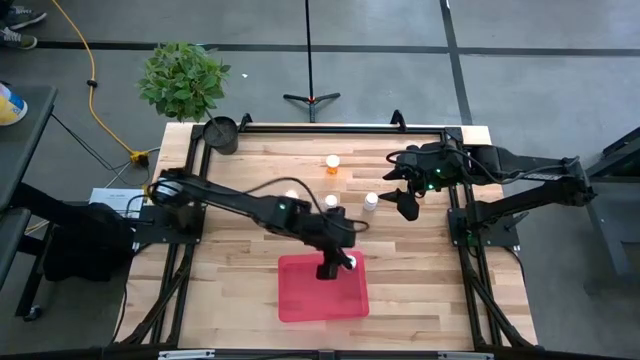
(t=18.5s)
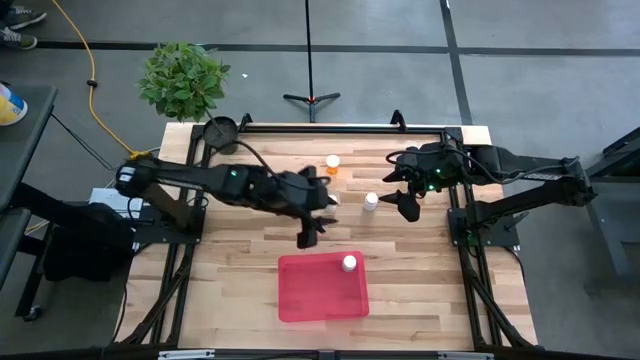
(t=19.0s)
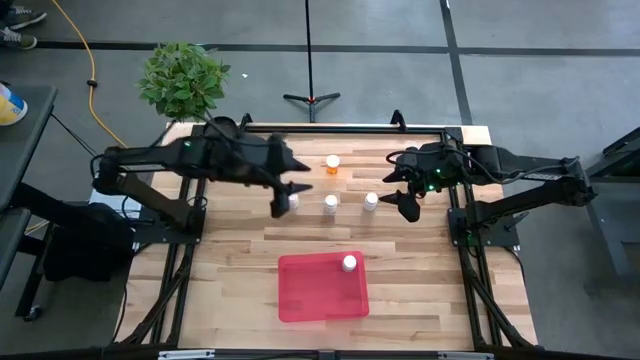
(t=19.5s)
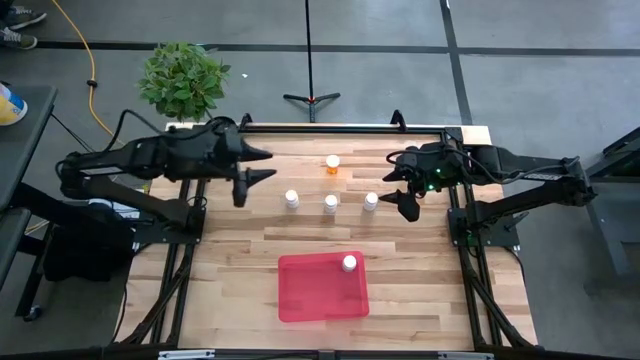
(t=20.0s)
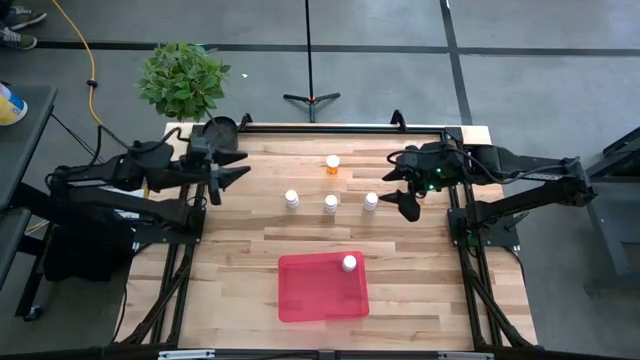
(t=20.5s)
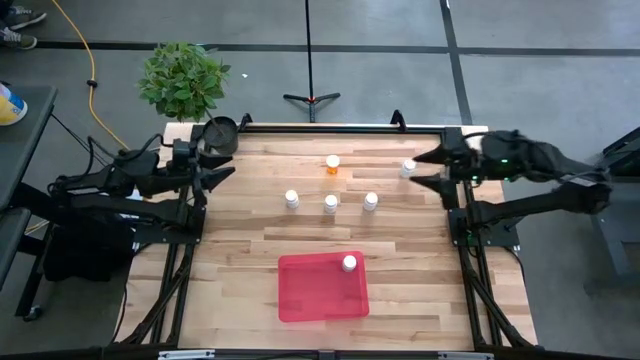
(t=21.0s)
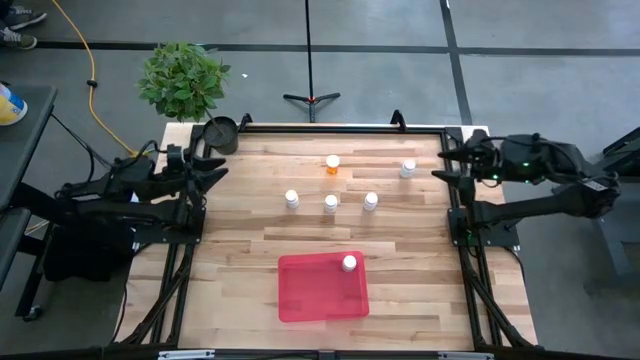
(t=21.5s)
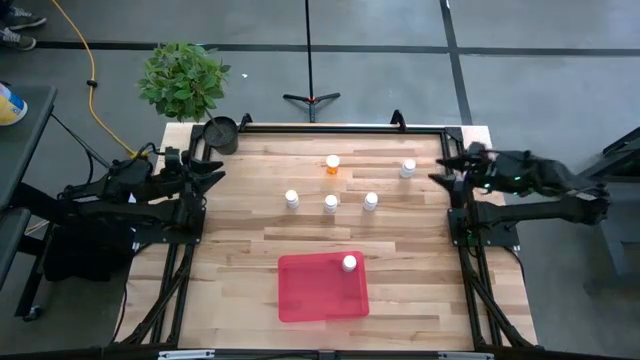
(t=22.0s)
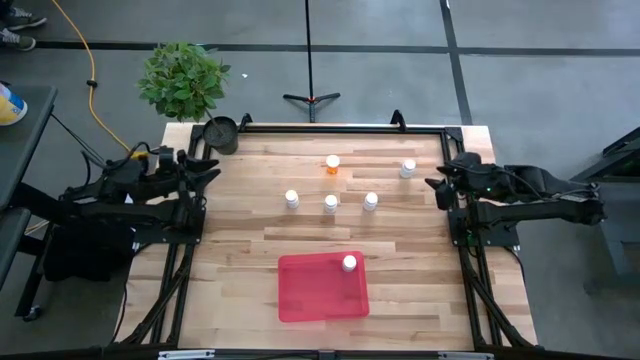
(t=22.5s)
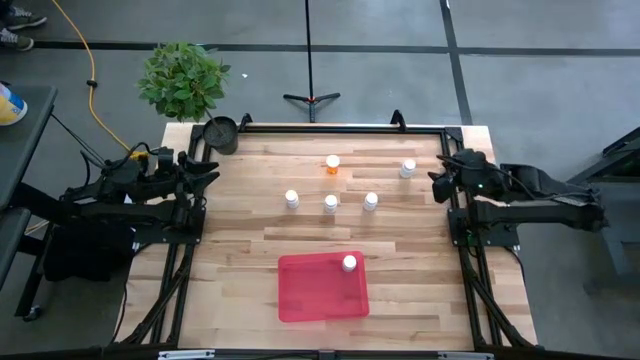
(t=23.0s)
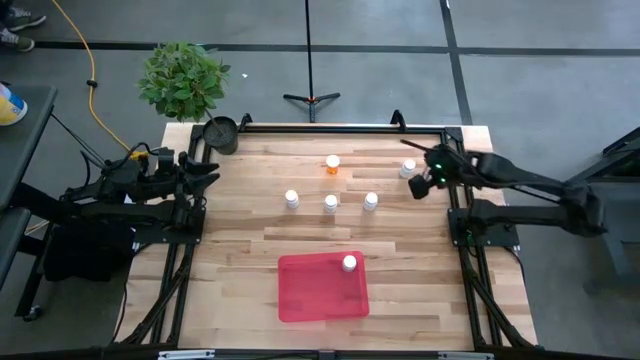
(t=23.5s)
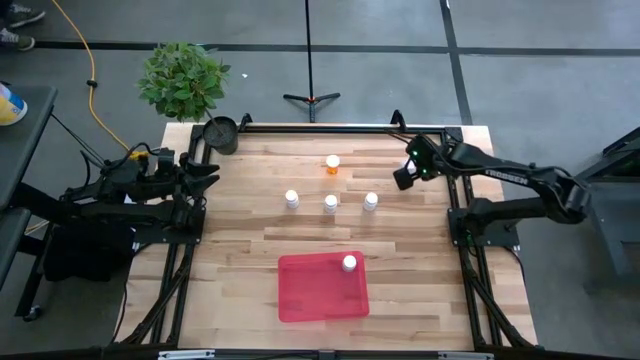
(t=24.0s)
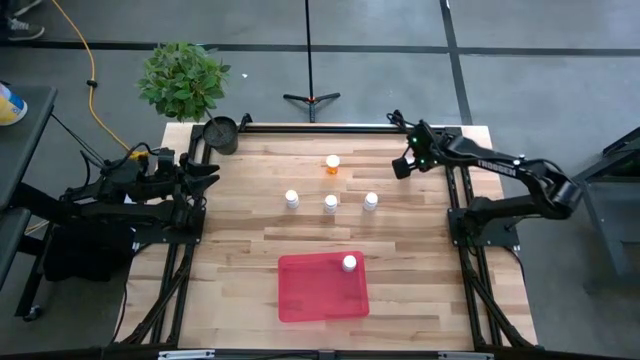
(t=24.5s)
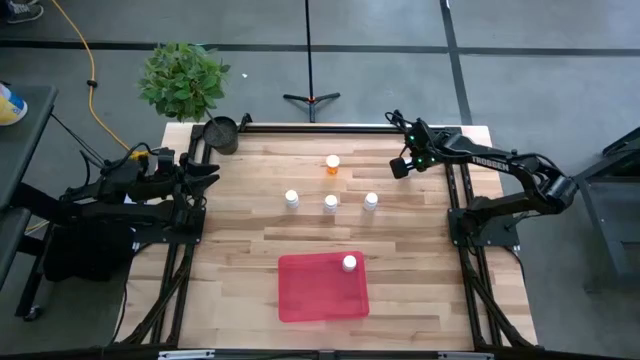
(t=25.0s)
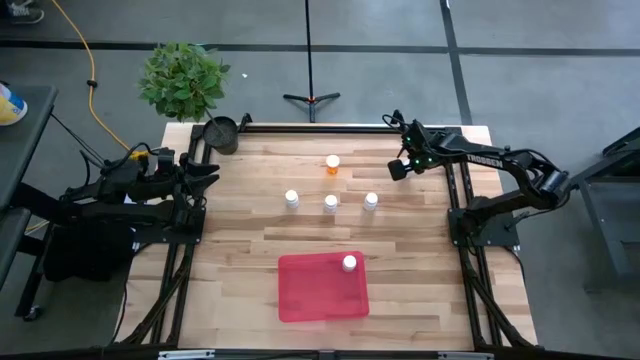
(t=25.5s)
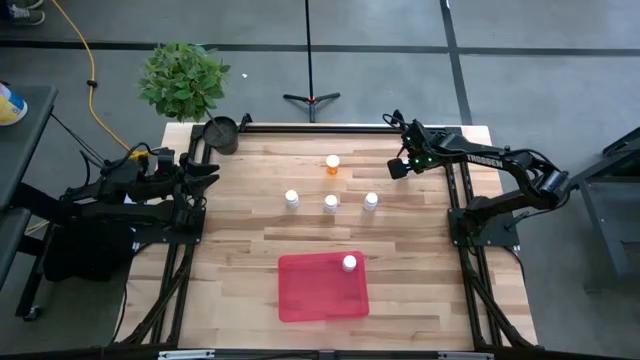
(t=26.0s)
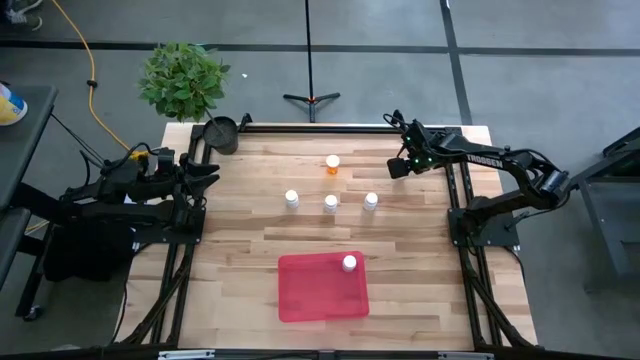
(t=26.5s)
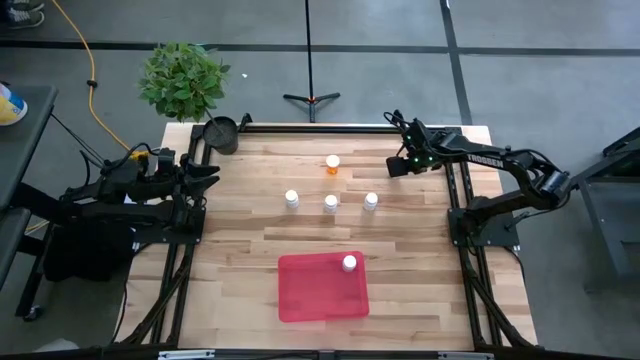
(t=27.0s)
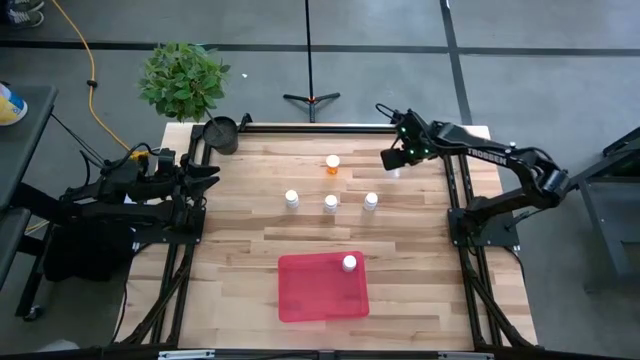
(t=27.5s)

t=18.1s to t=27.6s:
Task: Pick and place pill bottles into a basket
Put the white medicine bottle into the red container

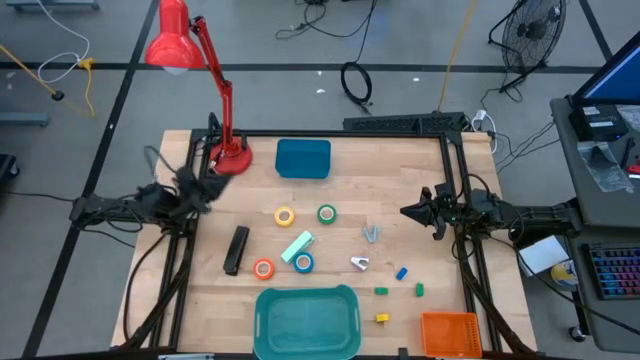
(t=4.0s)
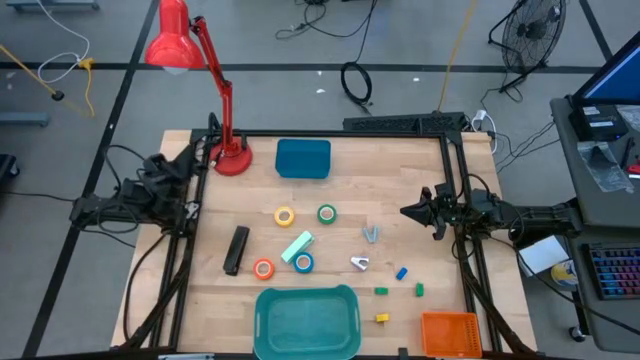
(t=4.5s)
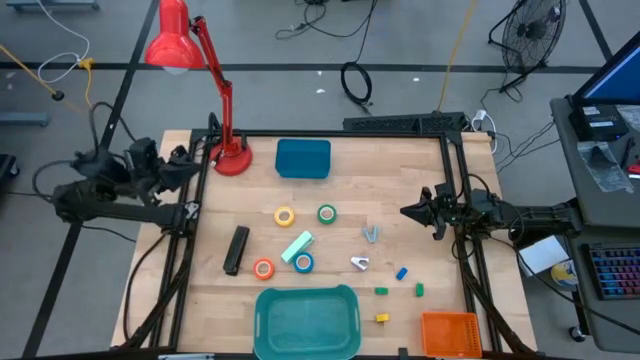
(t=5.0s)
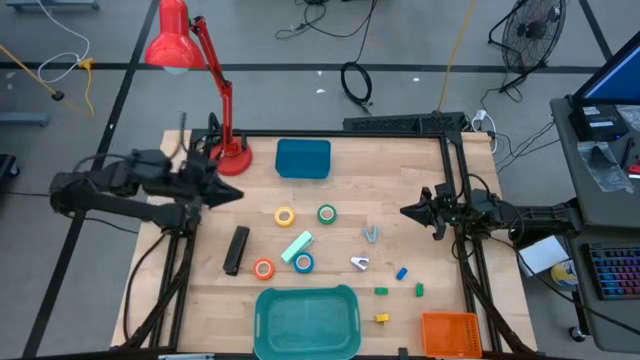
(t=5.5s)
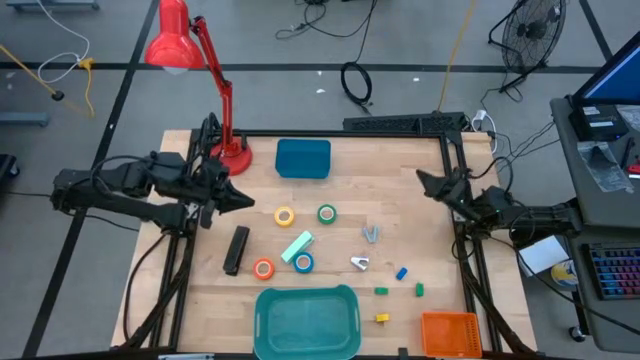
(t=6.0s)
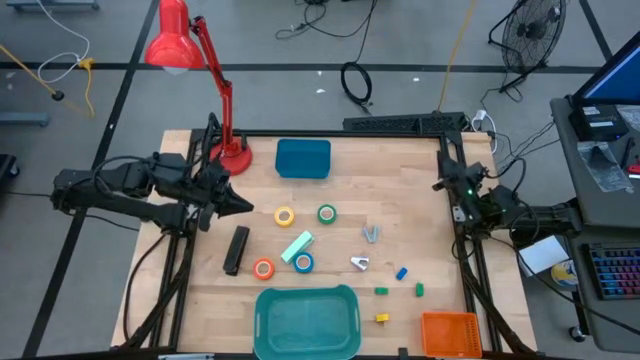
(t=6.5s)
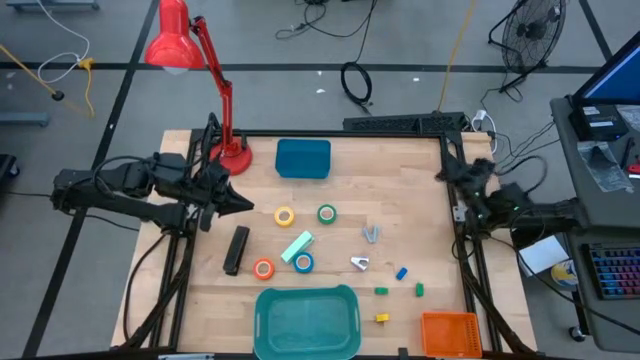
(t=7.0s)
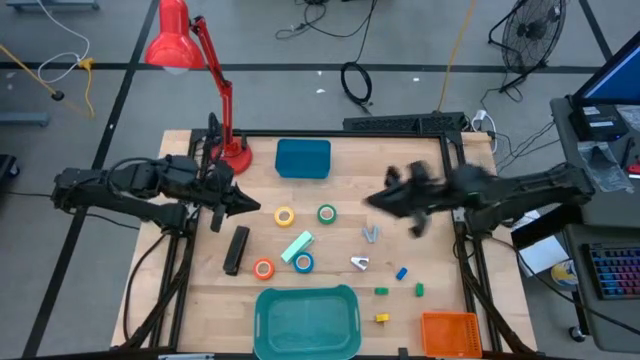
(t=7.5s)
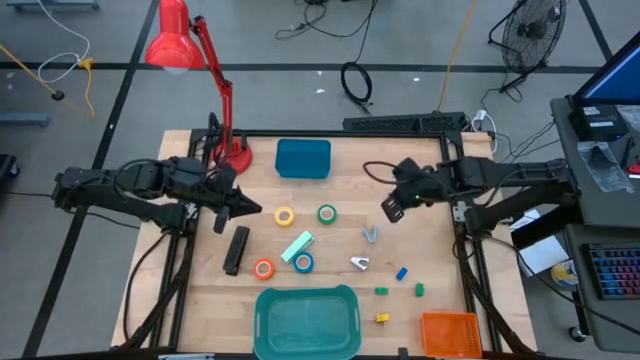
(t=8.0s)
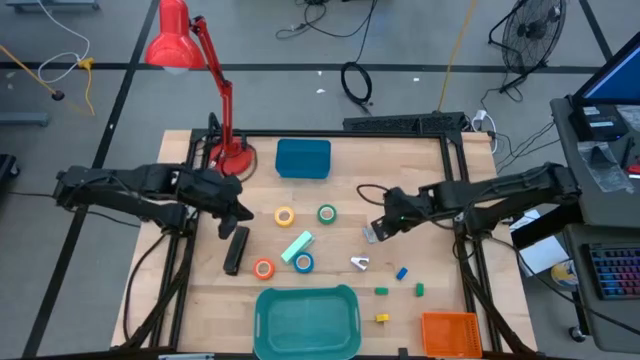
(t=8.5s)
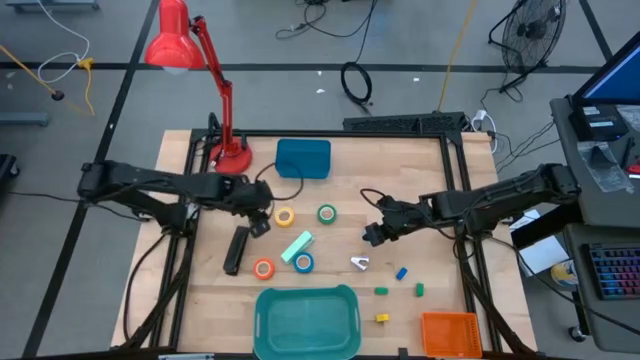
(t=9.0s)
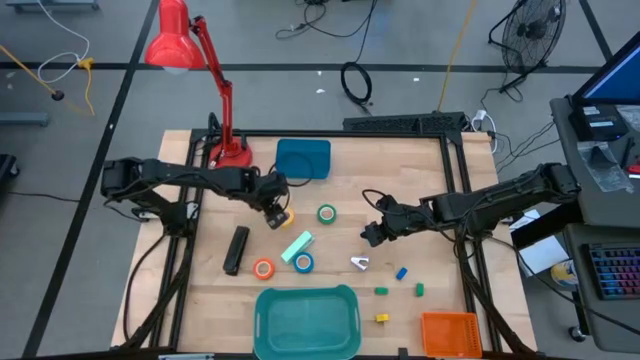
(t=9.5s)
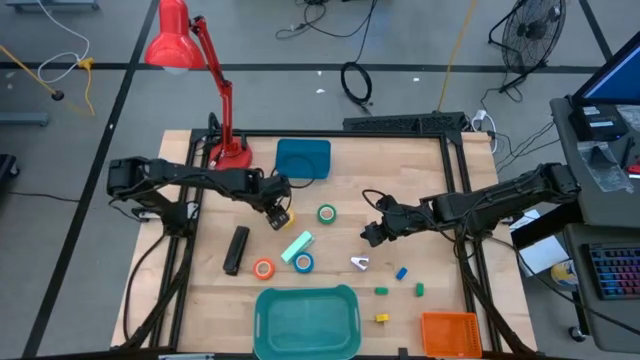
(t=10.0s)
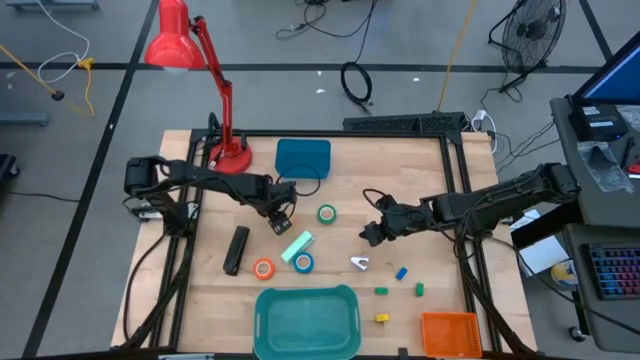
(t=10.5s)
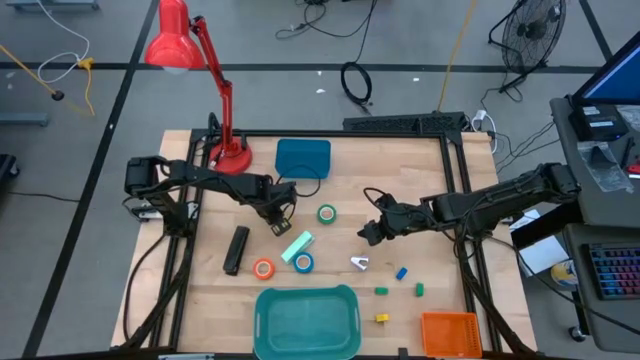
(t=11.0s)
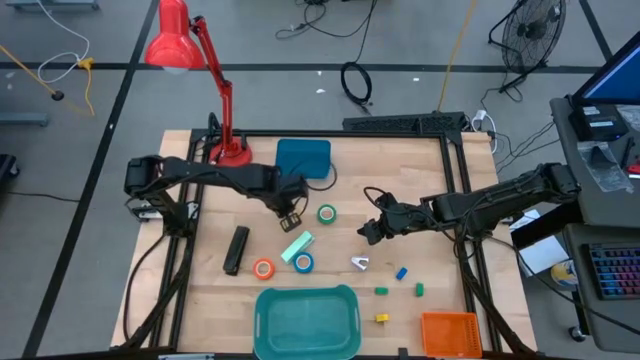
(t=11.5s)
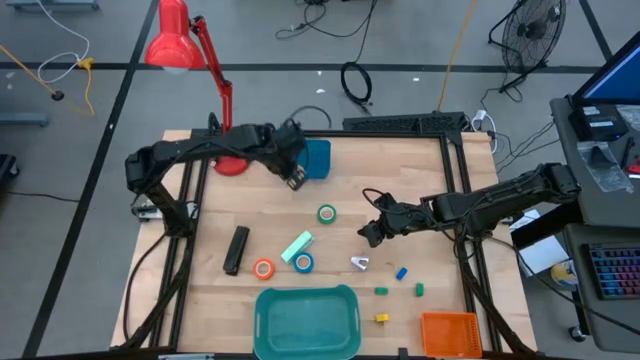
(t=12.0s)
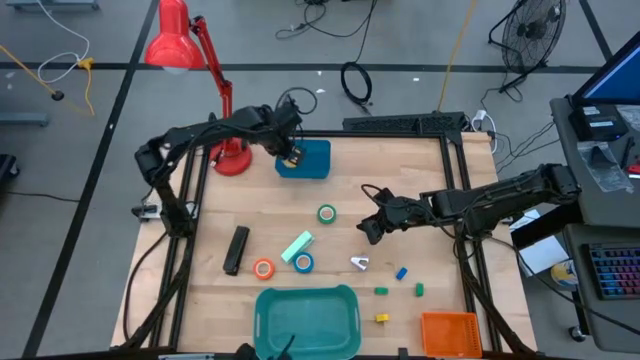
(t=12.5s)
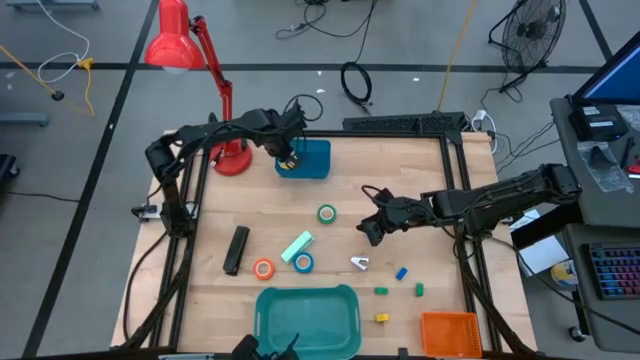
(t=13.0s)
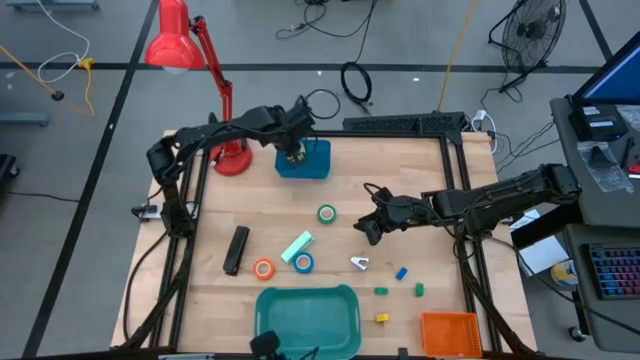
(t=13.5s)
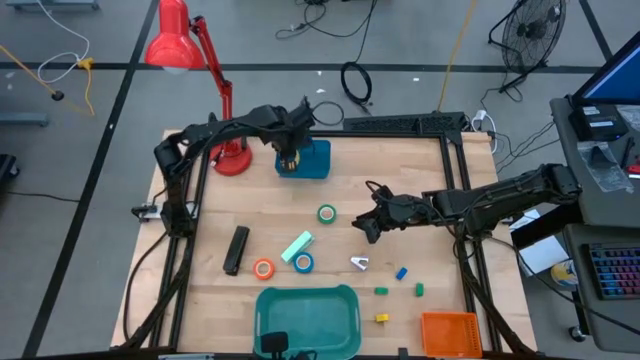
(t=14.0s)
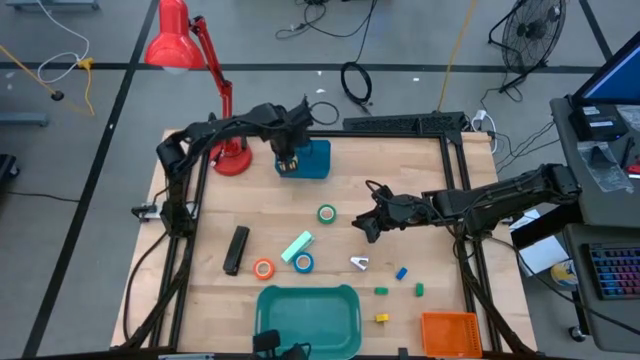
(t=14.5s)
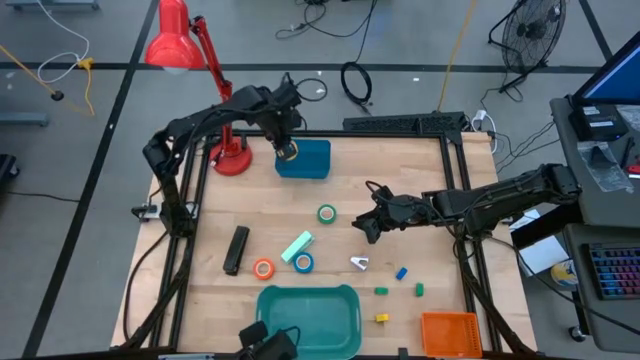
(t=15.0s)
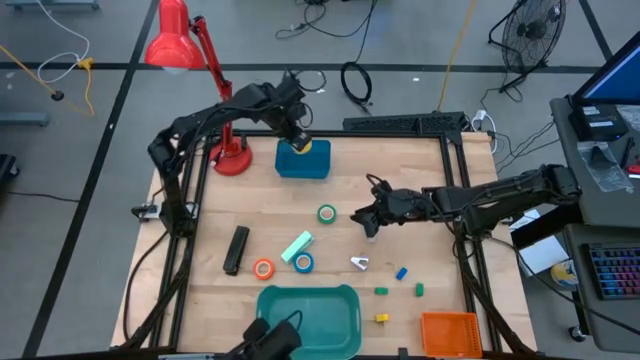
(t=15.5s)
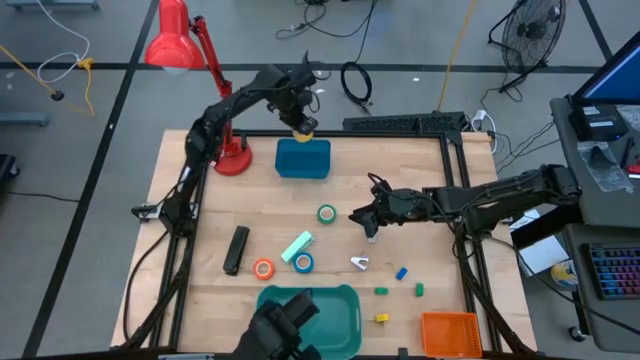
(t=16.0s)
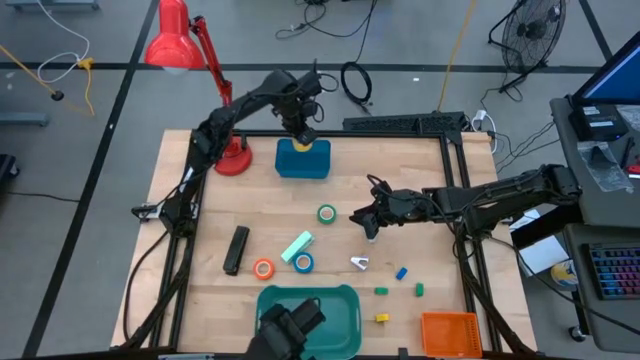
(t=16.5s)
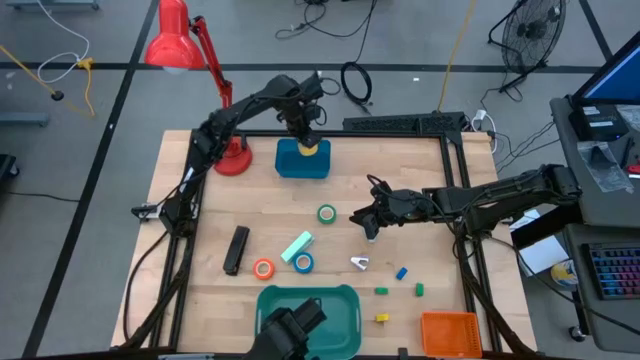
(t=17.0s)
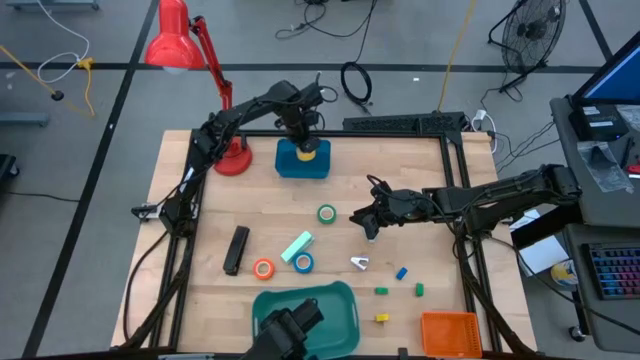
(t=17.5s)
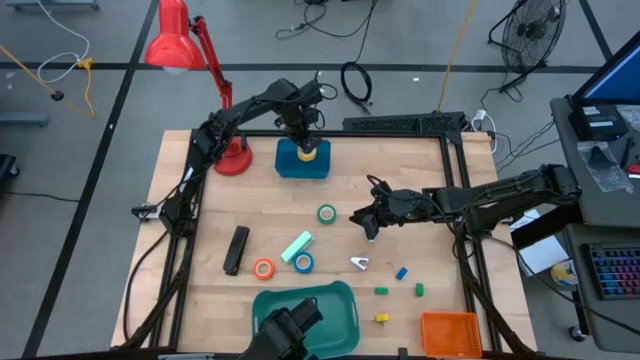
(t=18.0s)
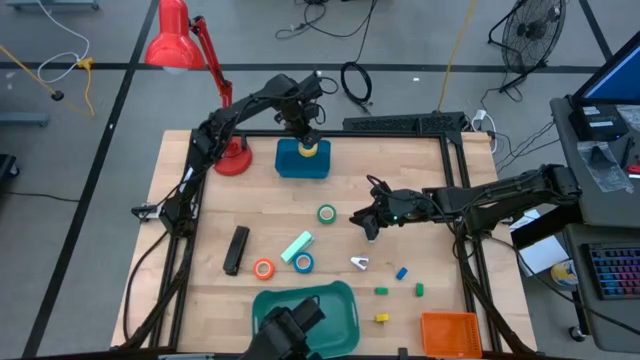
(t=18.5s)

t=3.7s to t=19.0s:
Task: Pick and place Stapler, Stapler remover, tape
Put the yellow tape into the blue bin
